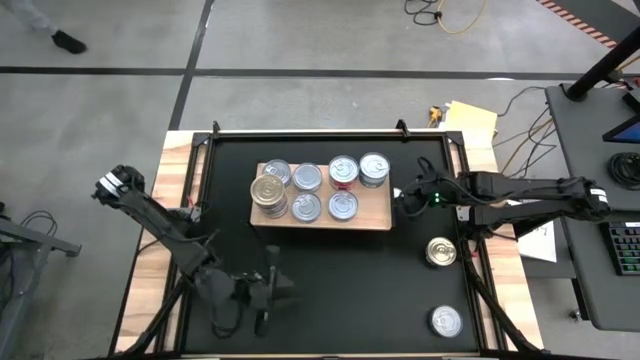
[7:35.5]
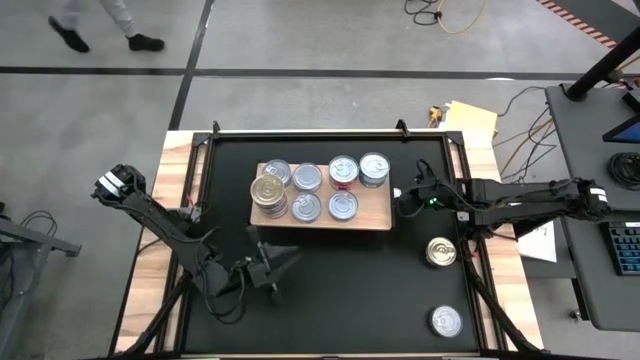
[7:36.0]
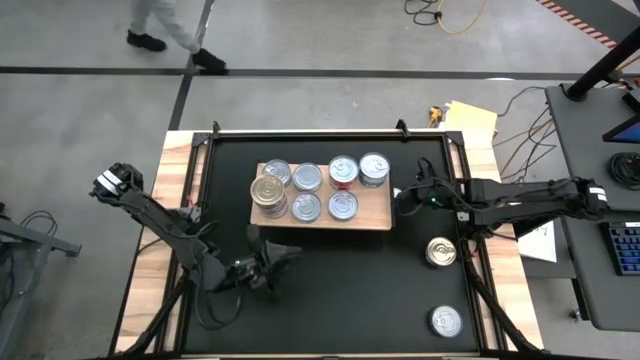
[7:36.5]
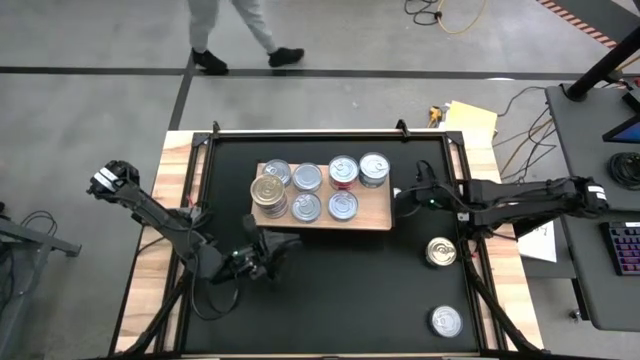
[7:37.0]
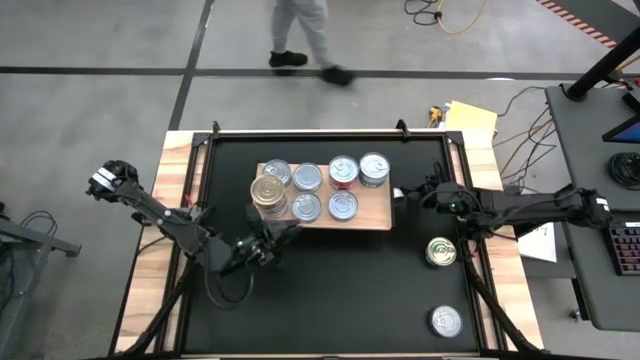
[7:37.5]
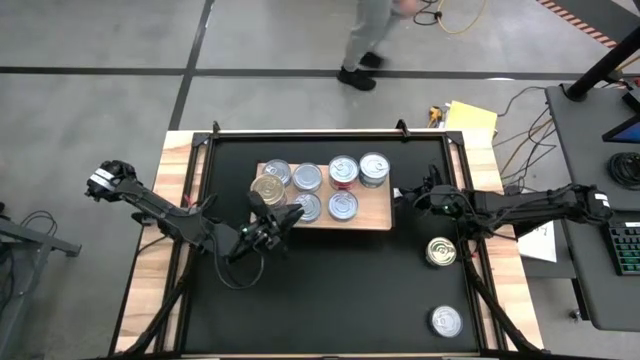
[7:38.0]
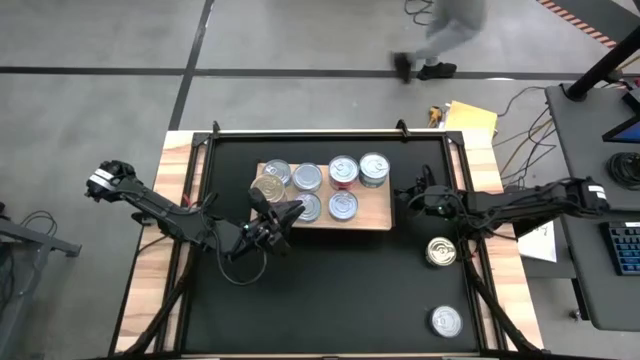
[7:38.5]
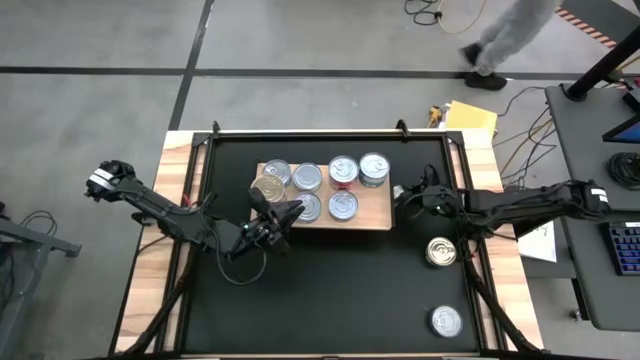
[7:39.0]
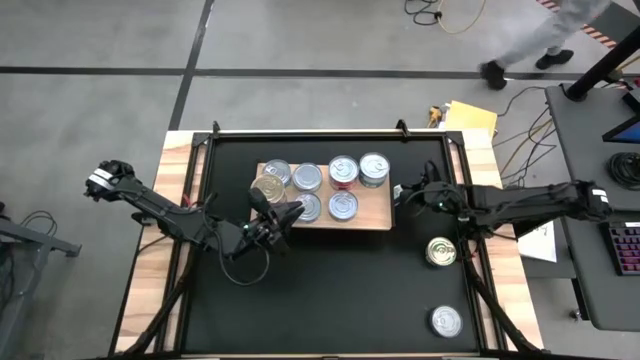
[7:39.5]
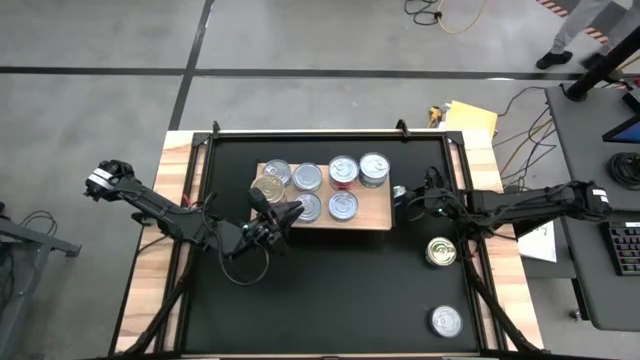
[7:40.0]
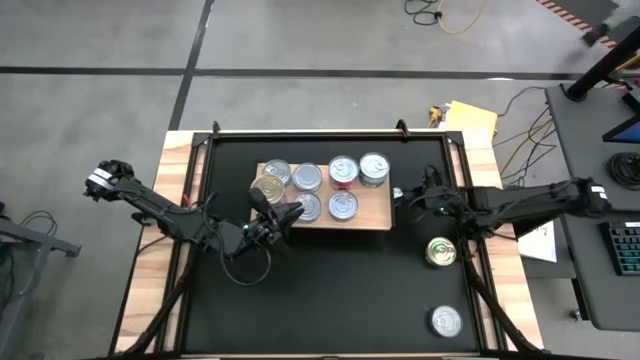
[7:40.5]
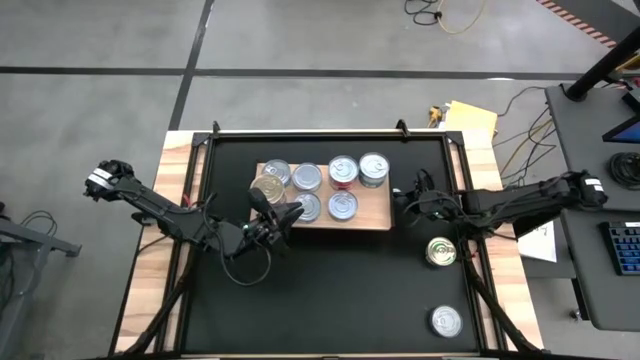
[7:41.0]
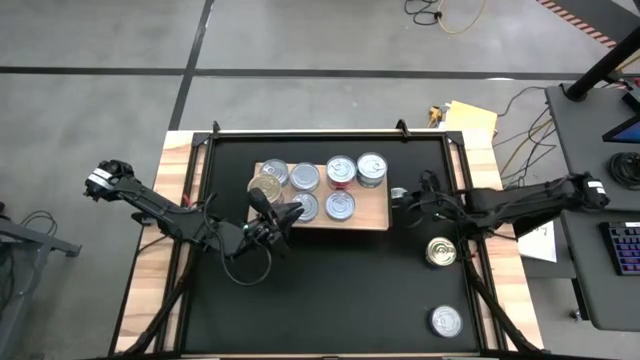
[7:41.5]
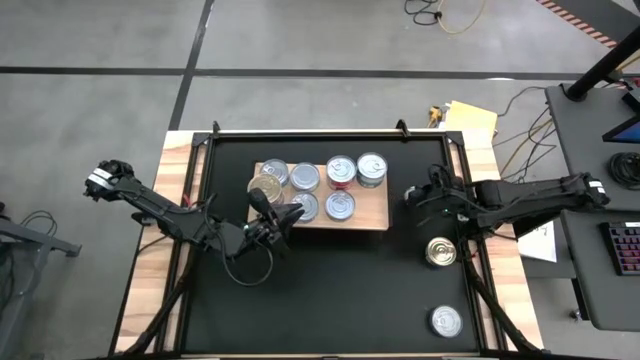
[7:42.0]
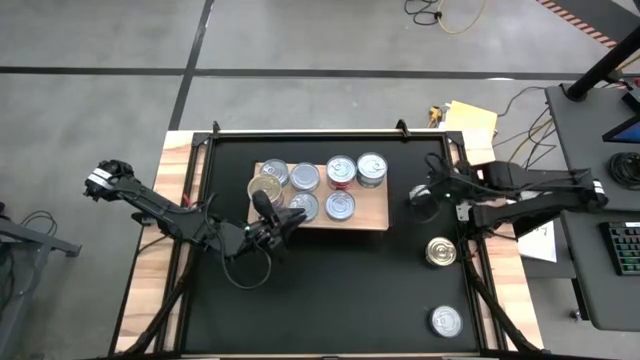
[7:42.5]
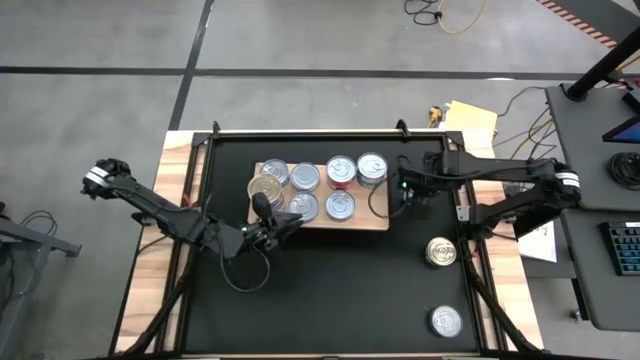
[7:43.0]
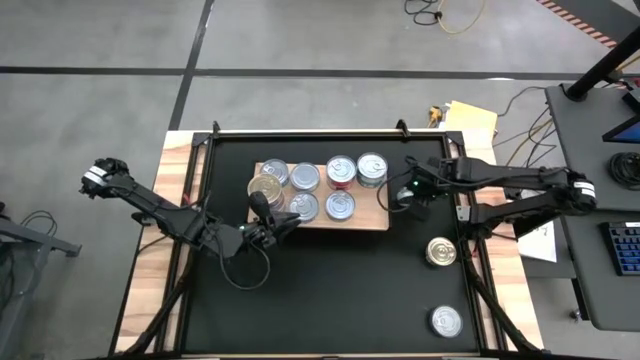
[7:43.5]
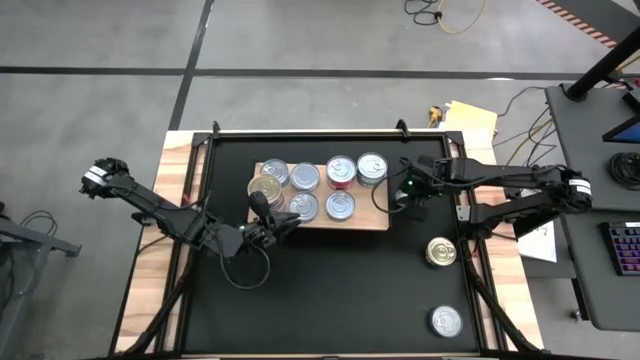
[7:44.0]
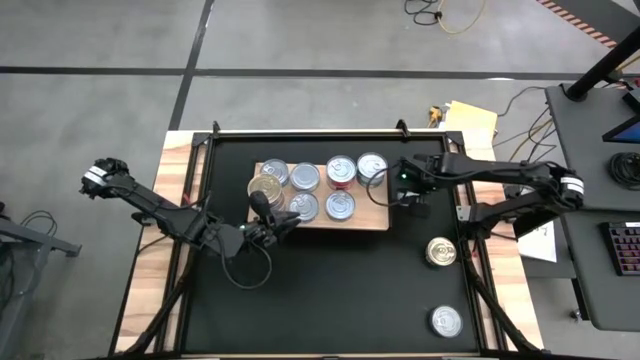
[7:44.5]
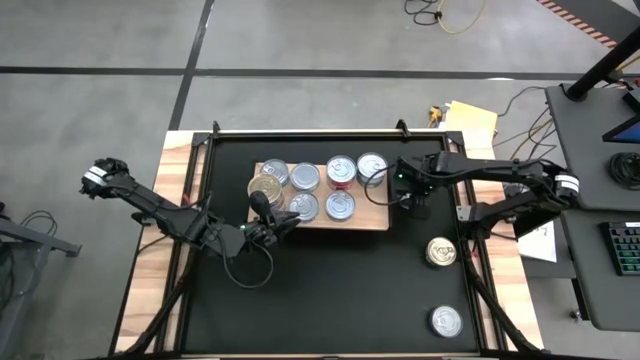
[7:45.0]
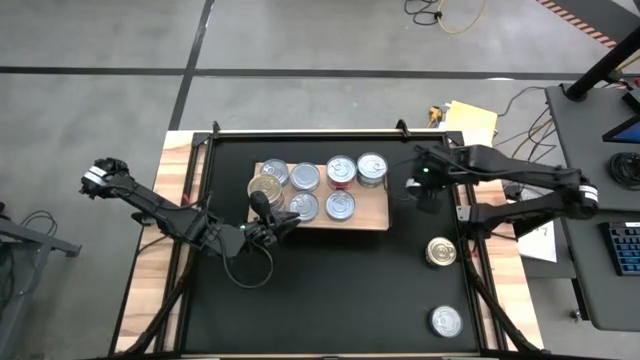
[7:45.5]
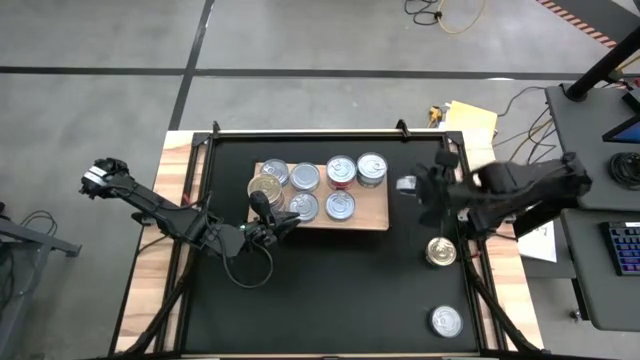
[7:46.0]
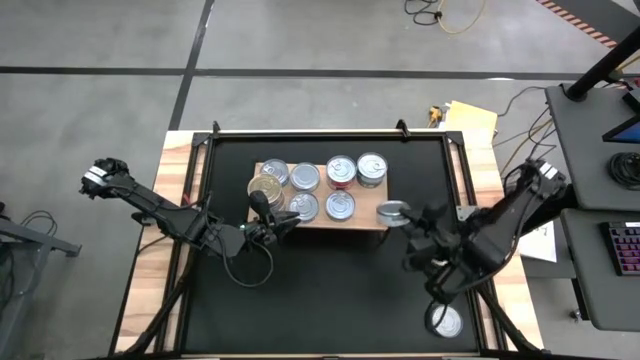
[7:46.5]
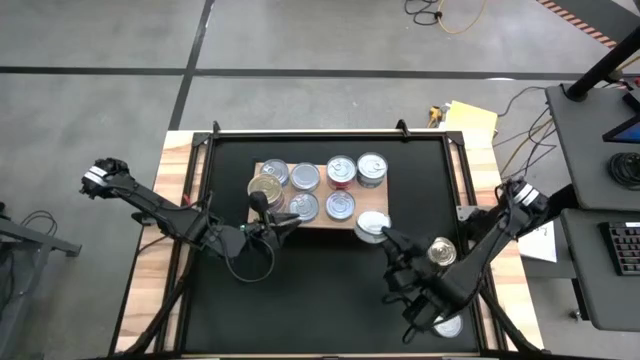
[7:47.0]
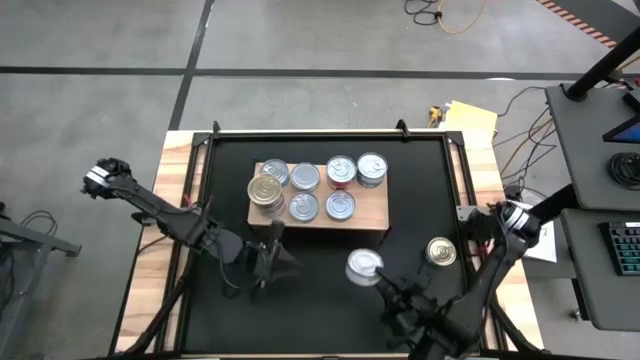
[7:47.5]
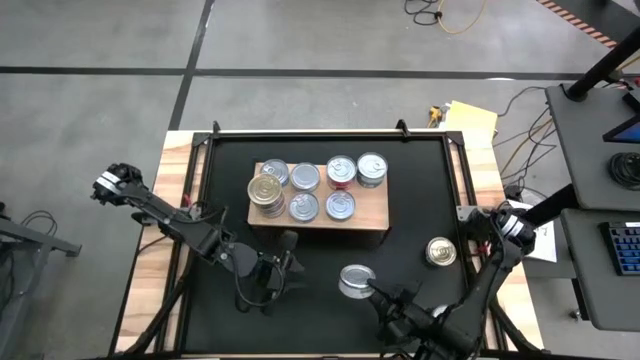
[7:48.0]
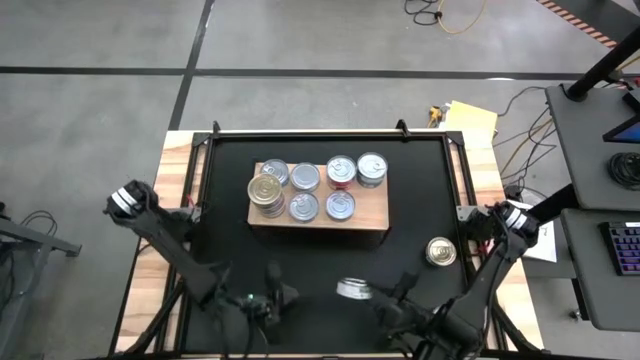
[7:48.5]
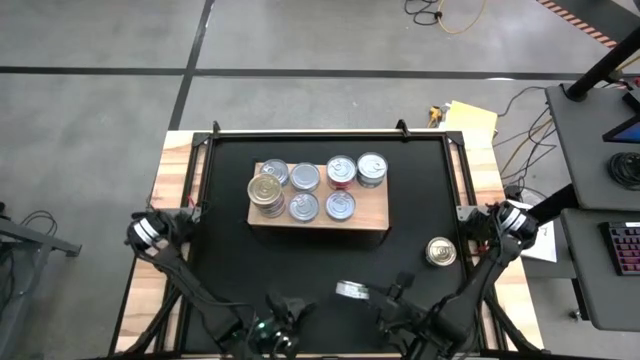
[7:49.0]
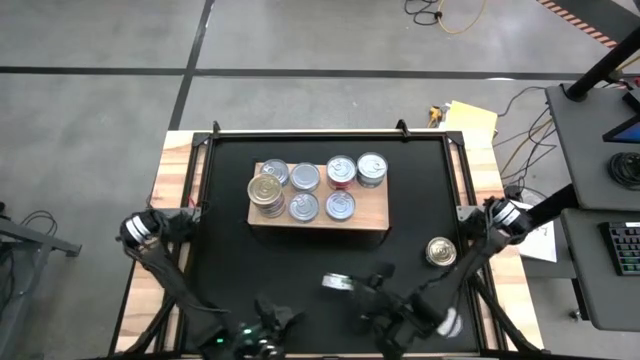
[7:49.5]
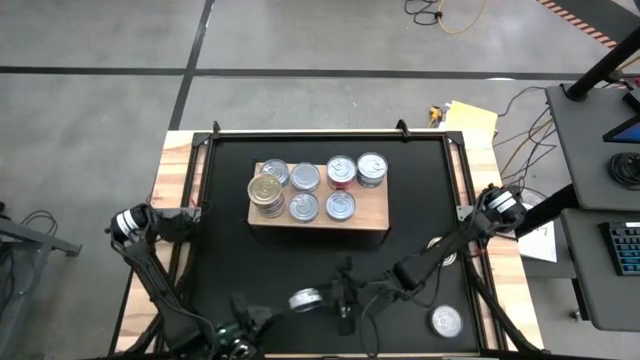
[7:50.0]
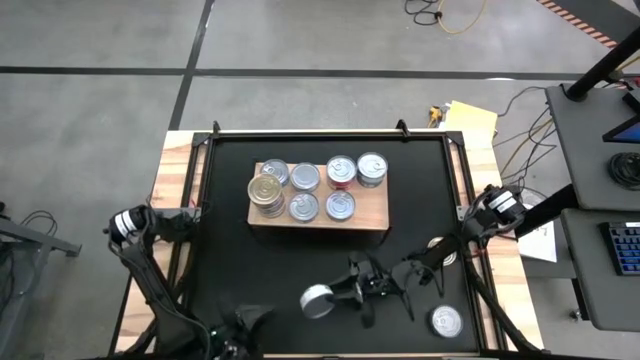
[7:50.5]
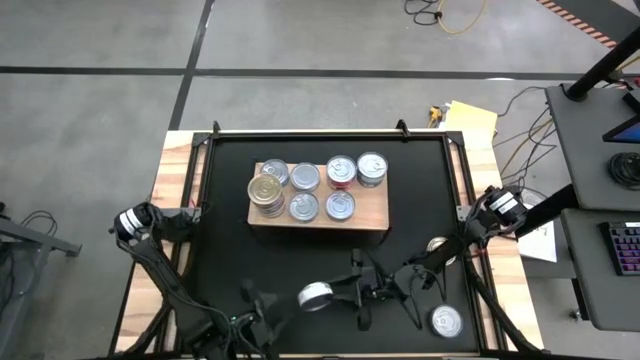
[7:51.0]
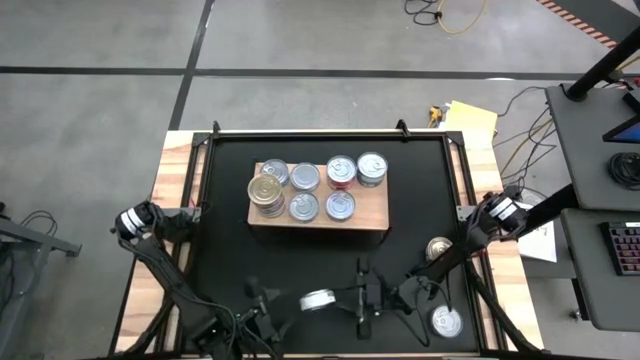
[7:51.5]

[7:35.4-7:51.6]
Task: Stack canned seafood by type on shelf
Stack the green tuna can on the green tuna can

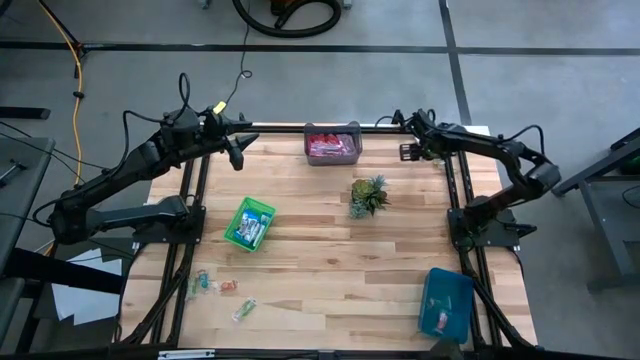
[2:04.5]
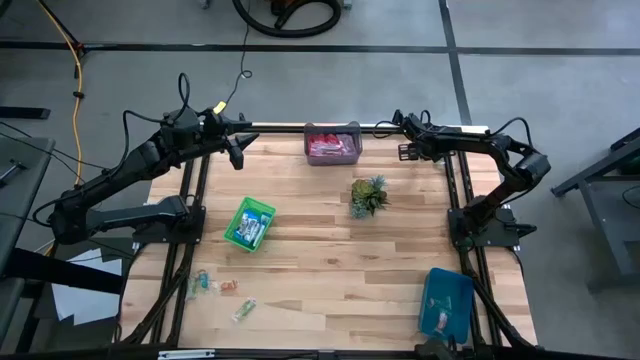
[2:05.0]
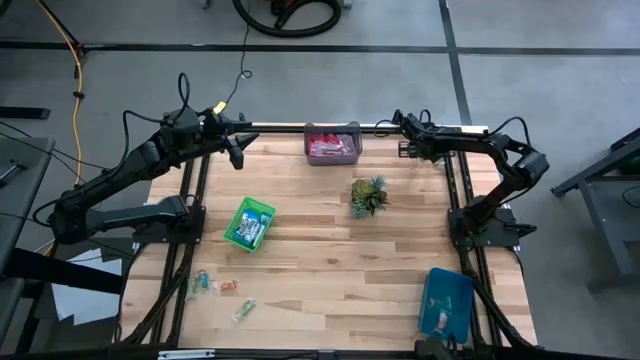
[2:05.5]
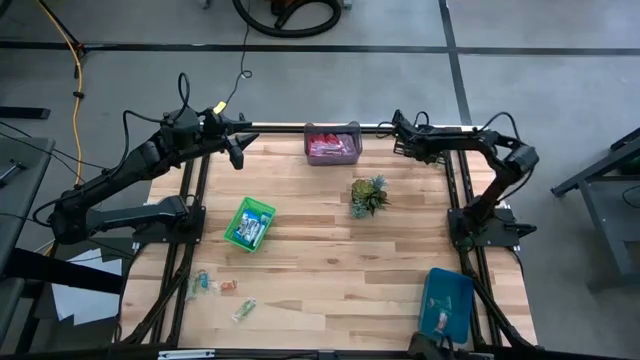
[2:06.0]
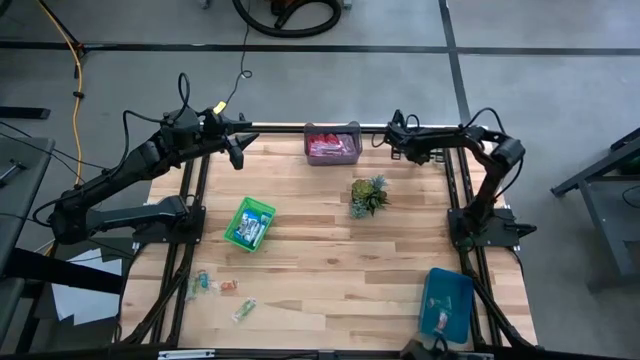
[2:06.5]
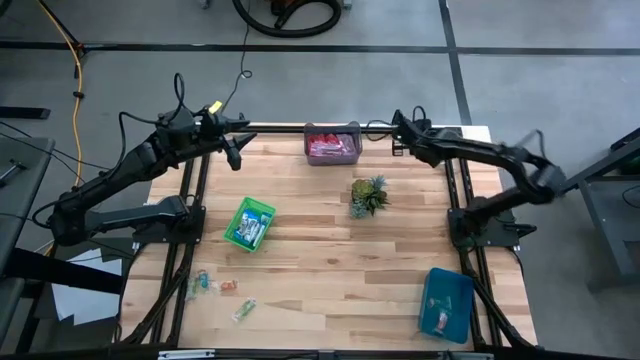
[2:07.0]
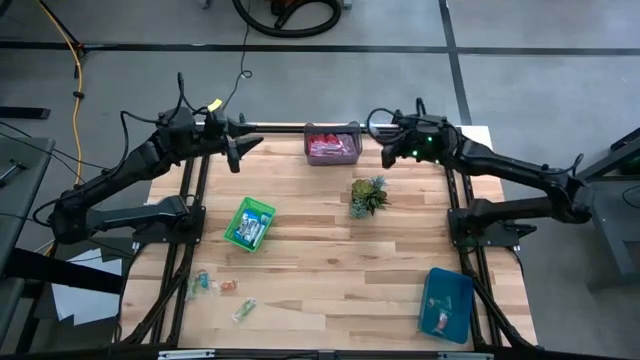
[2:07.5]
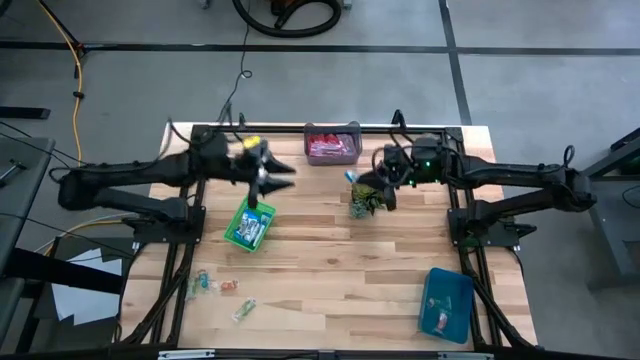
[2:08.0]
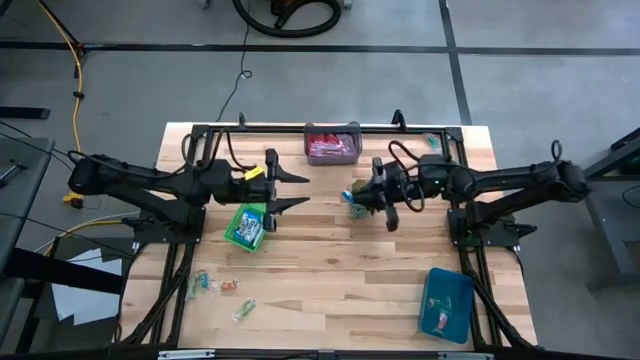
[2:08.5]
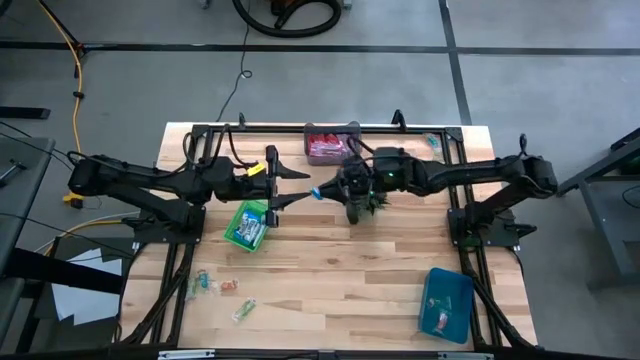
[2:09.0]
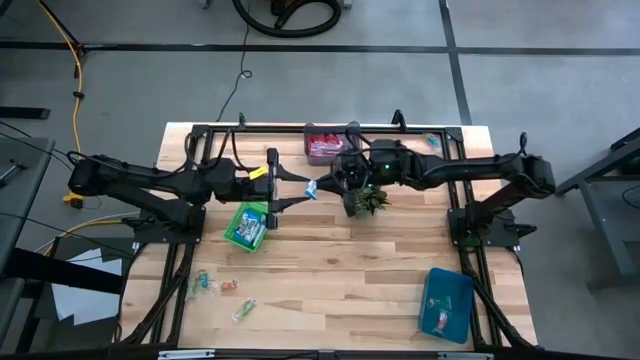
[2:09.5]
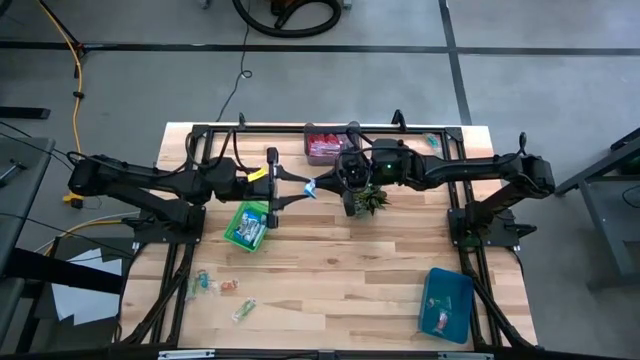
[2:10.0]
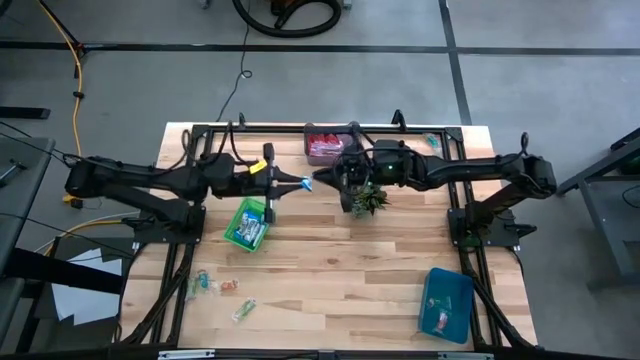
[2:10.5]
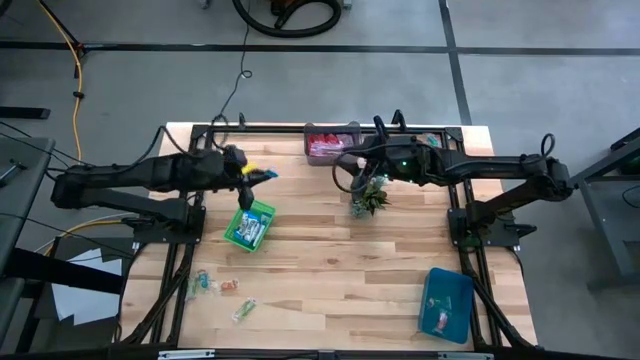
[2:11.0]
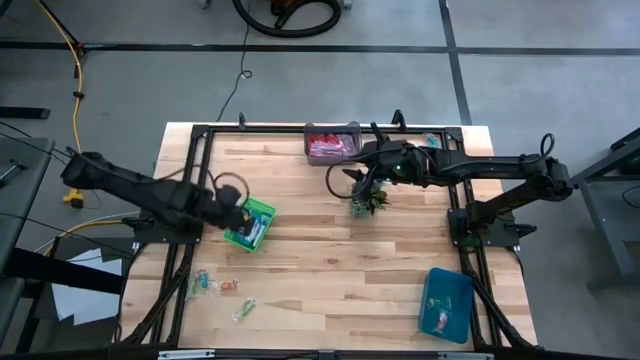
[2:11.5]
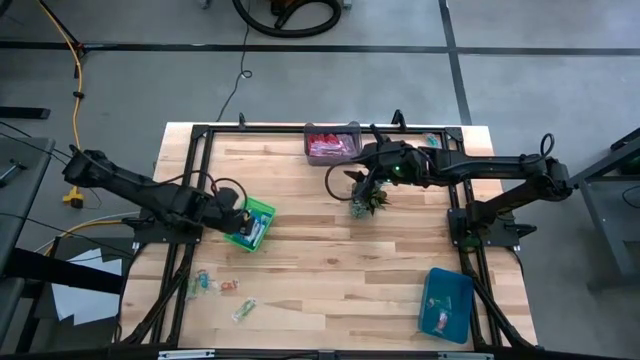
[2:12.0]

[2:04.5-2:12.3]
Task: Sort candy
Put the white candy into the green bin
